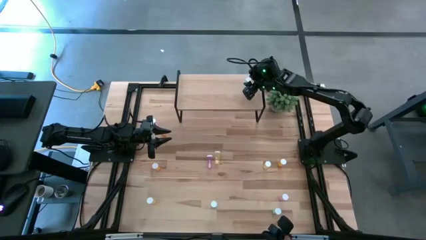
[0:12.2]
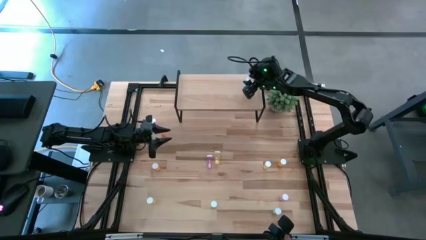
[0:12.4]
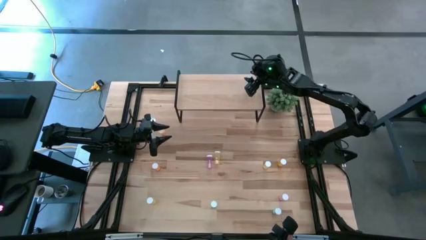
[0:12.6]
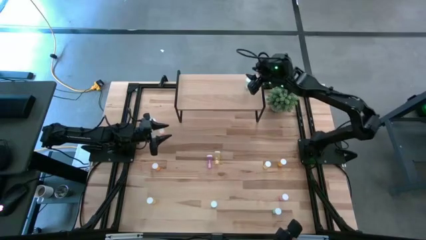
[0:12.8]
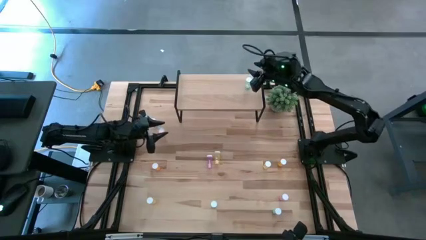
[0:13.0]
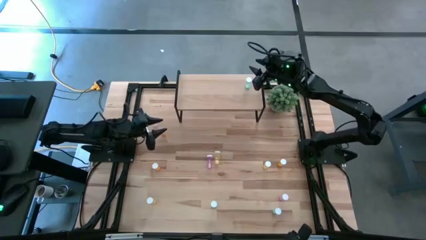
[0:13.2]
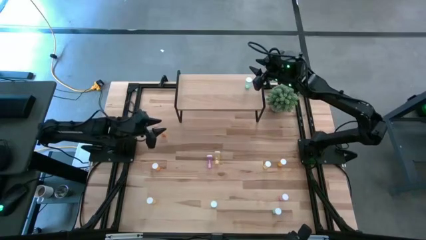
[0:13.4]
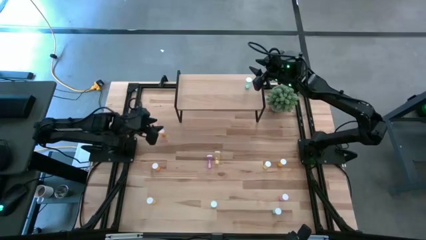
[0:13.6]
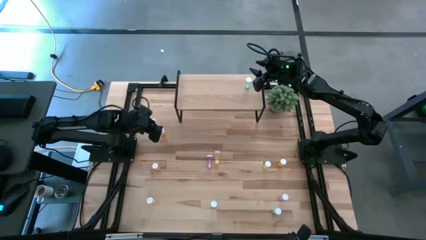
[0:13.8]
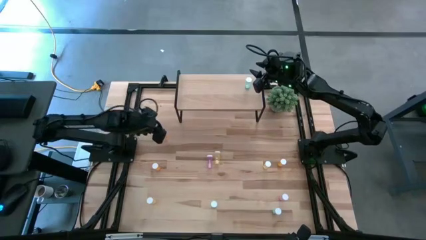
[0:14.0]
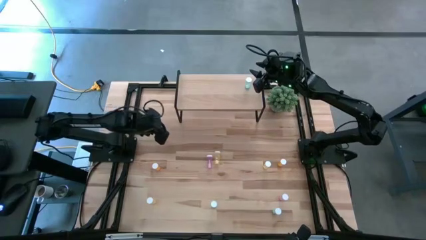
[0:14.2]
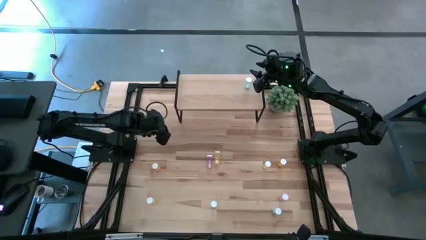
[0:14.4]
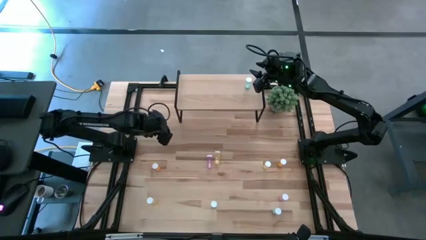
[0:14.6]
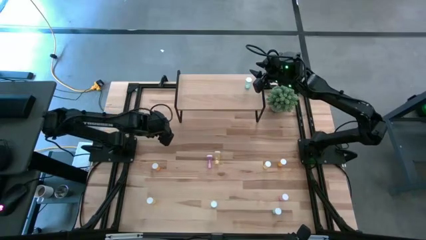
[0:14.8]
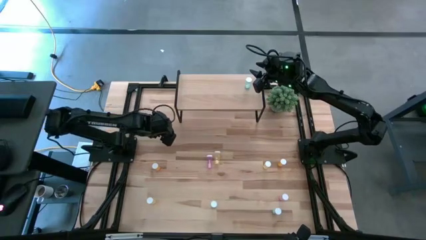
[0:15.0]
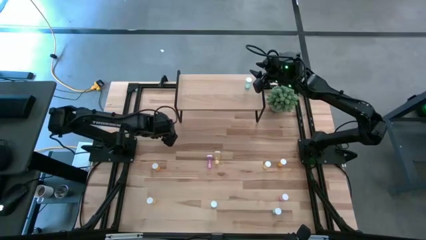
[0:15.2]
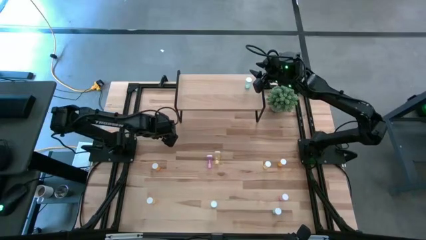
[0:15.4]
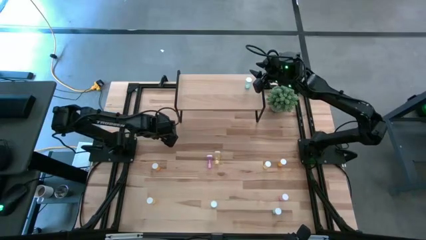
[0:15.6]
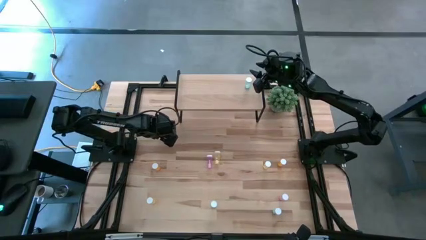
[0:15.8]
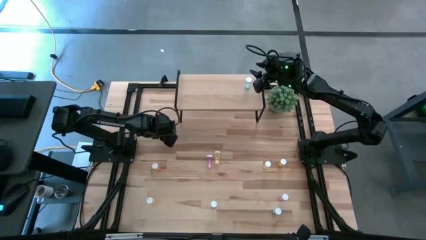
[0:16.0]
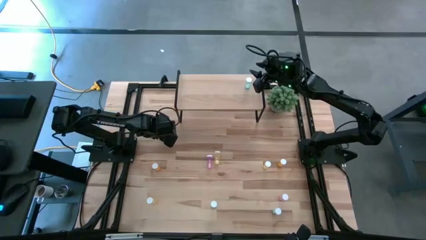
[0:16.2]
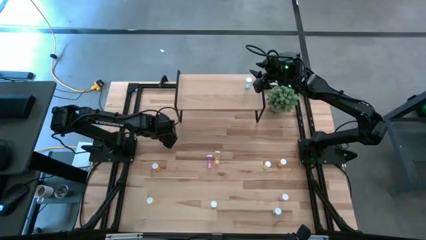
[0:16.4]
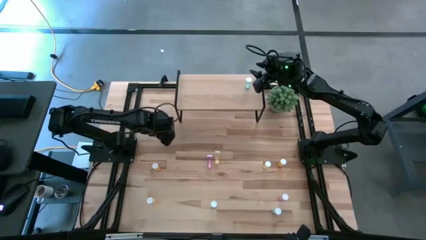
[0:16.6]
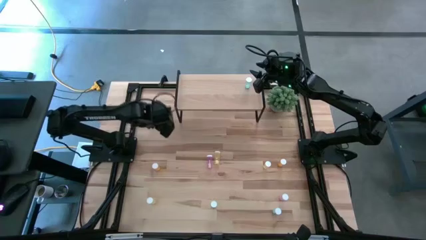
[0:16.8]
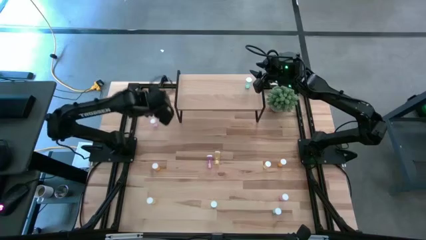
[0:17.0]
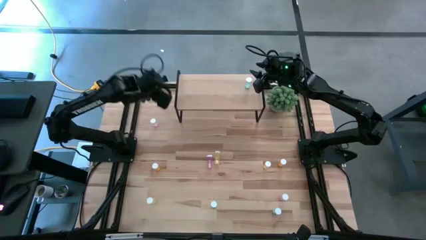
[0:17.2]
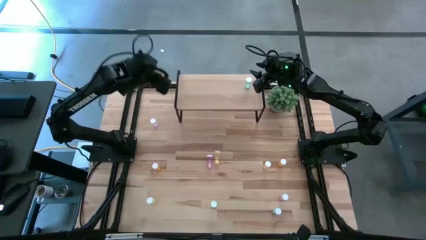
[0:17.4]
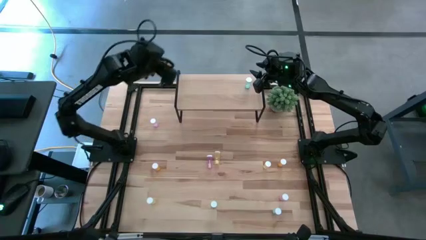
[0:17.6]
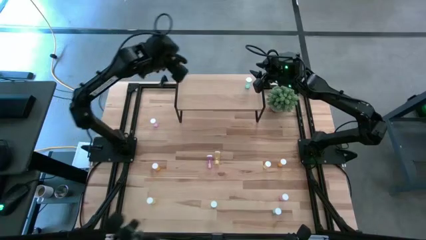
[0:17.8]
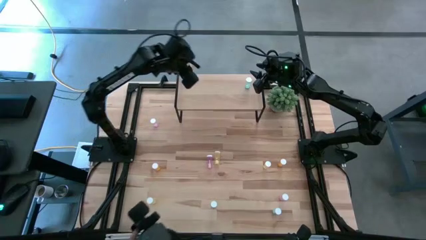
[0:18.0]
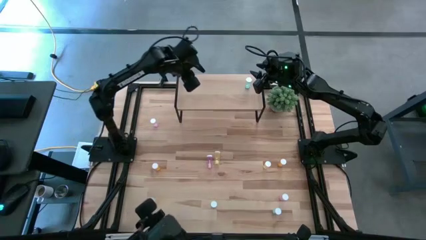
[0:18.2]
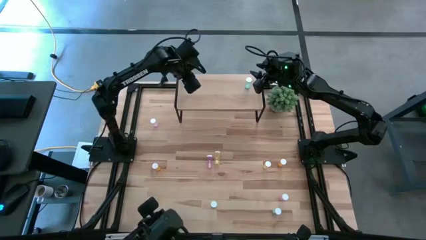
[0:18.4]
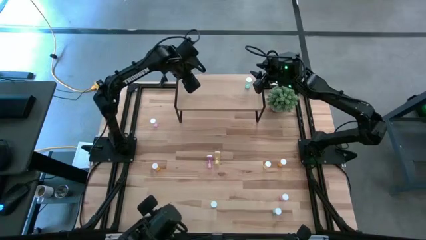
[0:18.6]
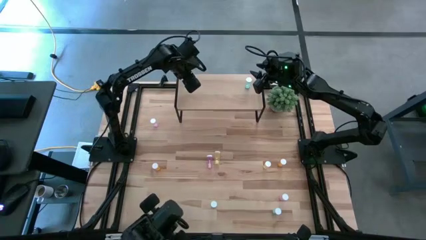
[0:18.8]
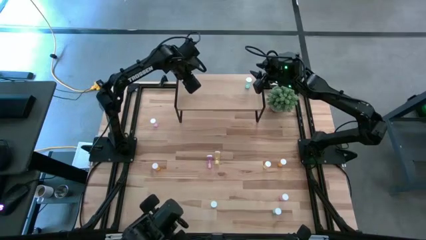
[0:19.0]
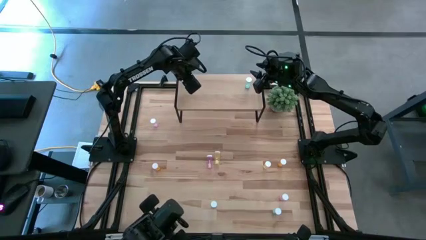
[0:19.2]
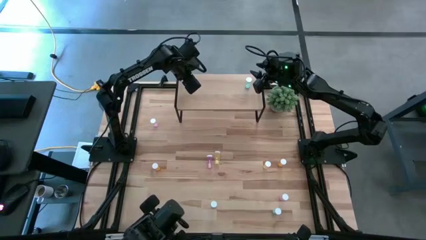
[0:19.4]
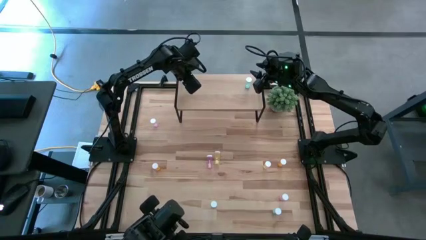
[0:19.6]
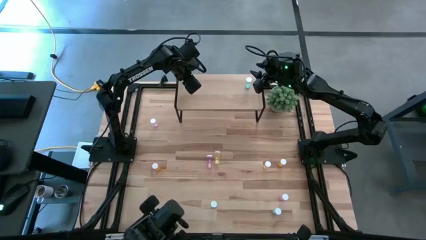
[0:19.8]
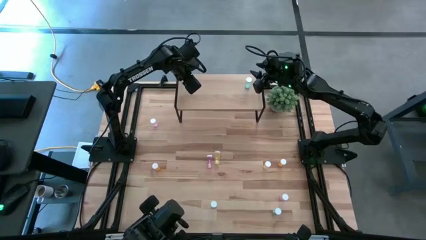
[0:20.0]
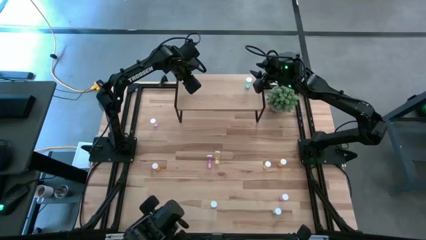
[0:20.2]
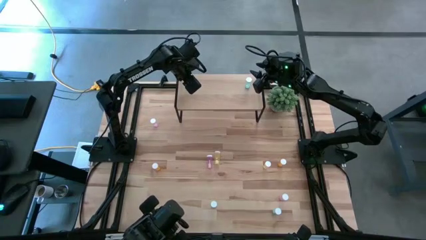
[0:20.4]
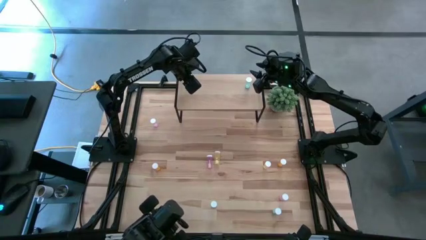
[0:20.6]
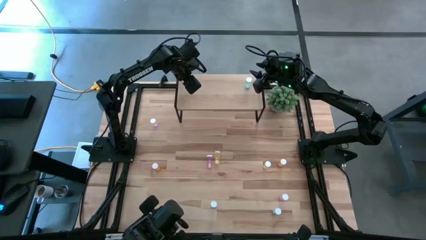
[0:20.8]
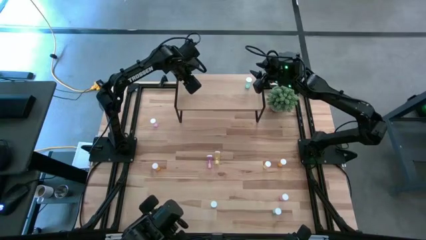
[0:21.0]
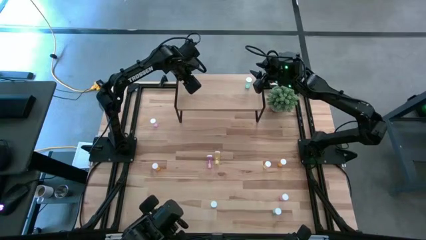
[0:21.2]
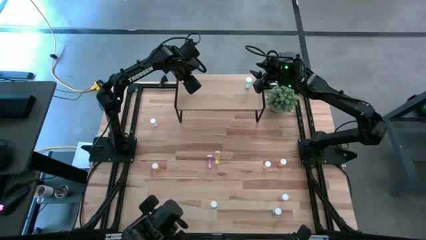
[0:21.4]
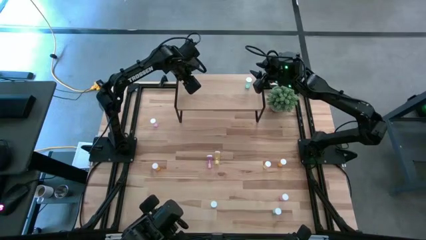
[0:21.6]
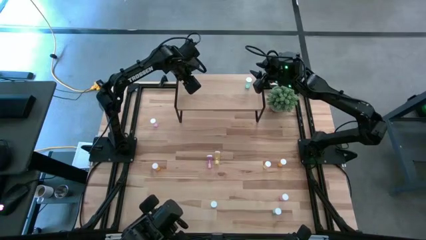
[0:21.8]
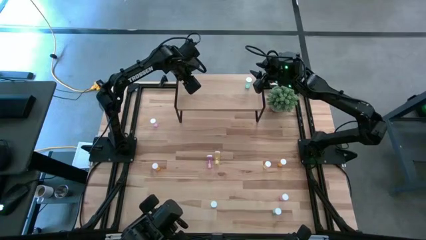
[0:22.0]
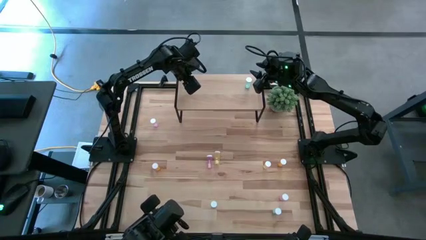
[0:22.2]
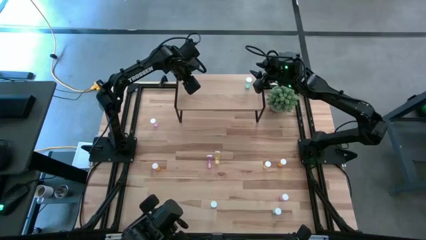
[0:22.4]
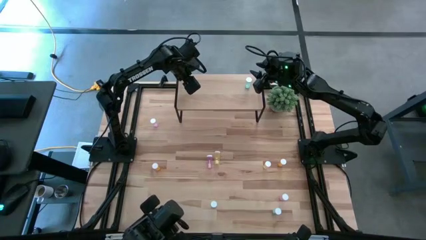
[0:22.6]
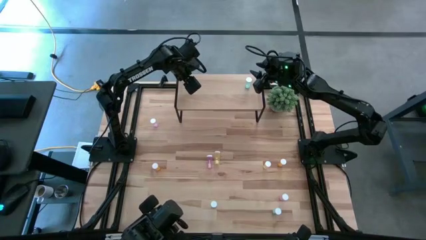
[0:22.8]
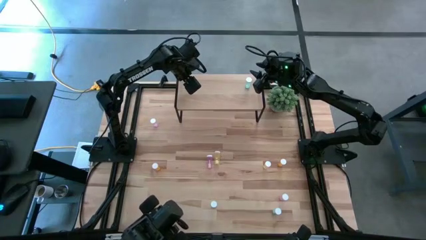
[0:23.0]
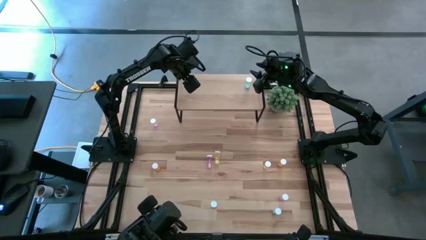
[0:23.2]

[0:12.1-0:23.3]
Task: Pick and place medicine bottles onto shelf by color
Put the top orange pill bottle on the shelf

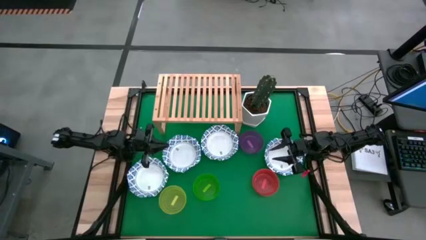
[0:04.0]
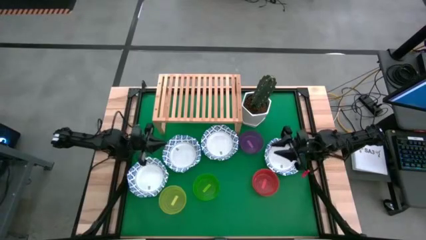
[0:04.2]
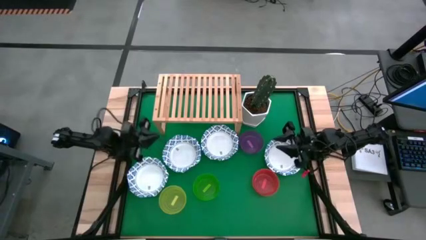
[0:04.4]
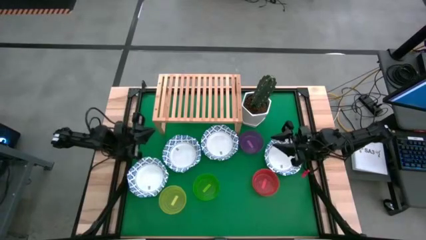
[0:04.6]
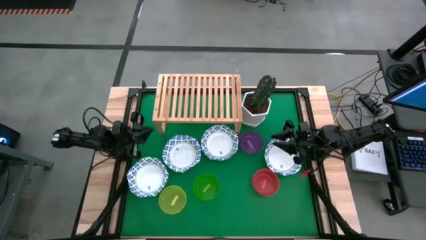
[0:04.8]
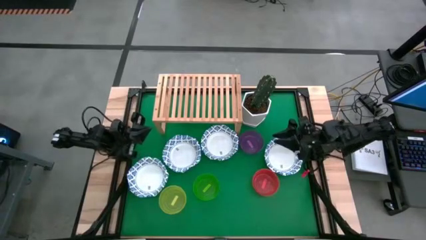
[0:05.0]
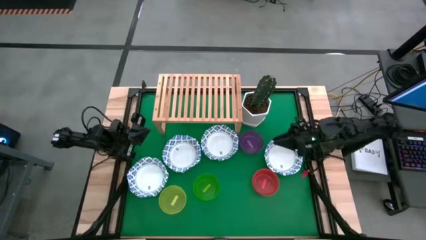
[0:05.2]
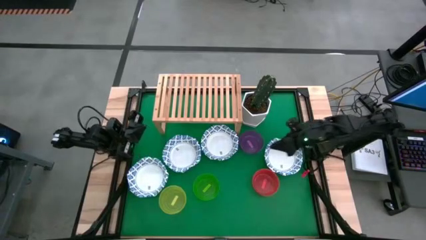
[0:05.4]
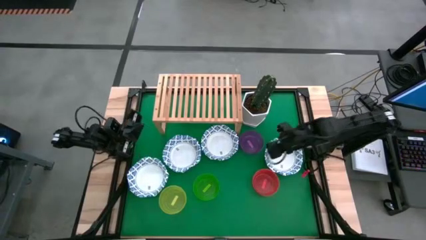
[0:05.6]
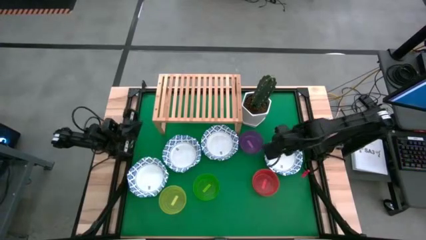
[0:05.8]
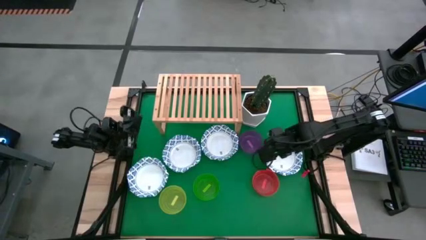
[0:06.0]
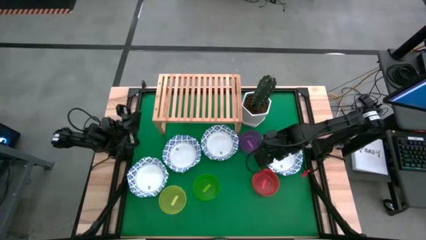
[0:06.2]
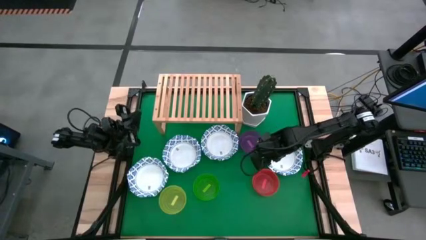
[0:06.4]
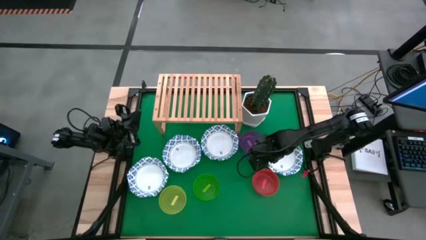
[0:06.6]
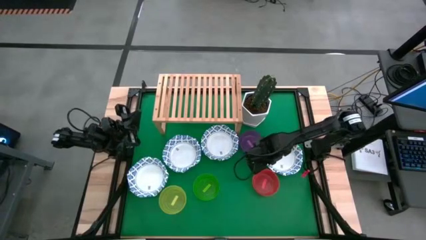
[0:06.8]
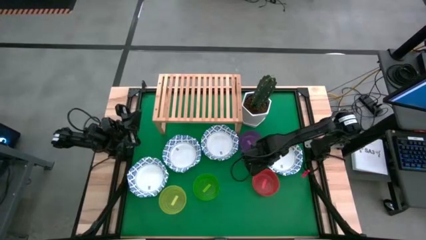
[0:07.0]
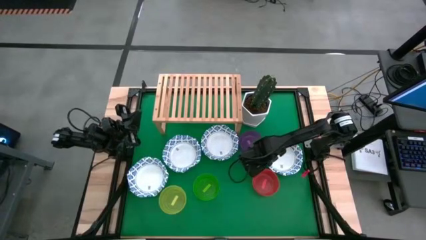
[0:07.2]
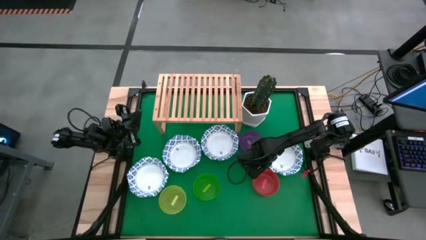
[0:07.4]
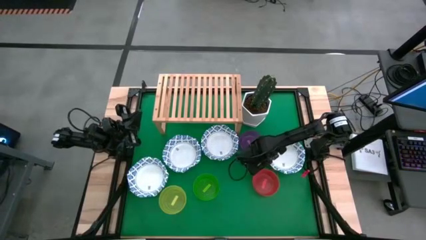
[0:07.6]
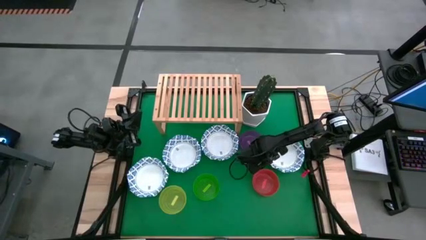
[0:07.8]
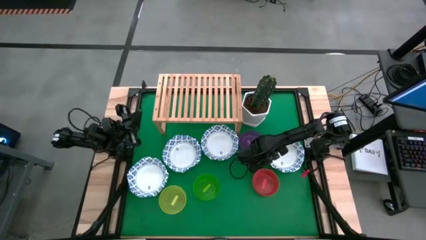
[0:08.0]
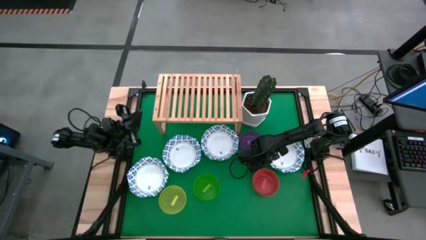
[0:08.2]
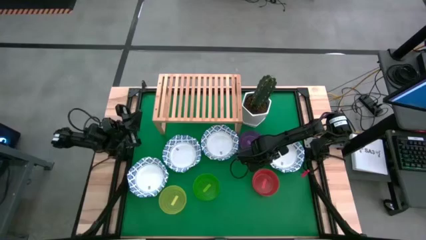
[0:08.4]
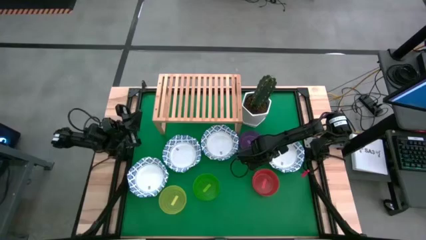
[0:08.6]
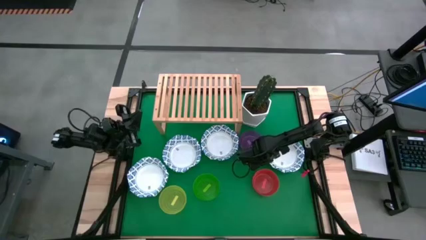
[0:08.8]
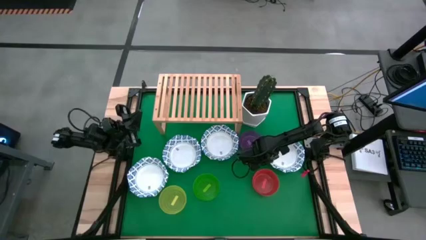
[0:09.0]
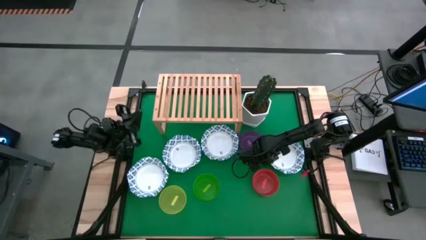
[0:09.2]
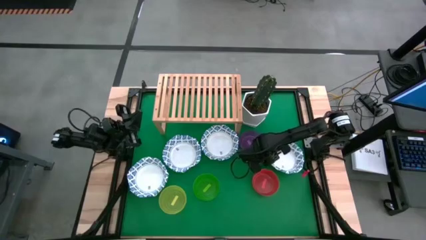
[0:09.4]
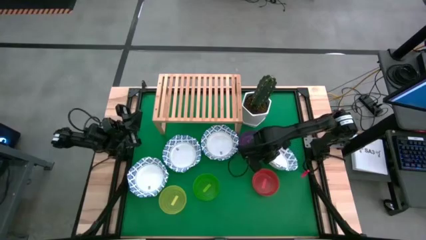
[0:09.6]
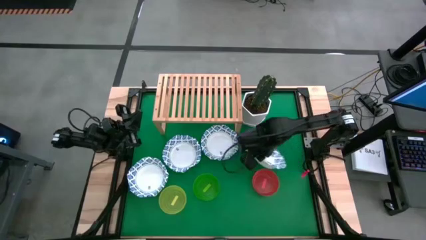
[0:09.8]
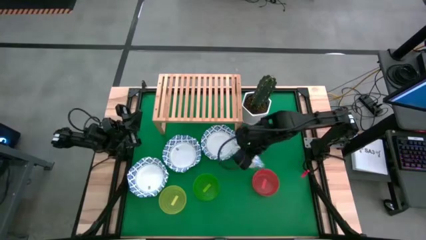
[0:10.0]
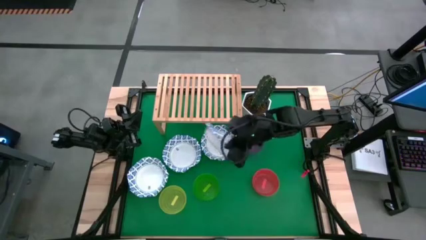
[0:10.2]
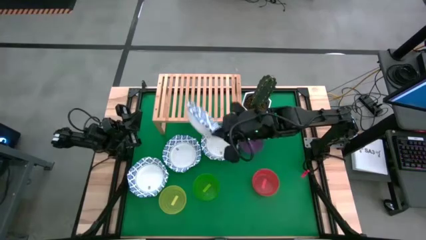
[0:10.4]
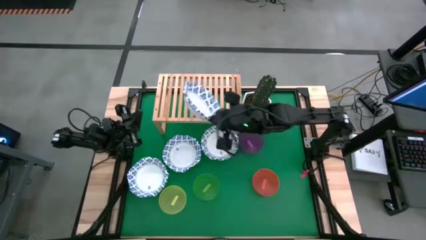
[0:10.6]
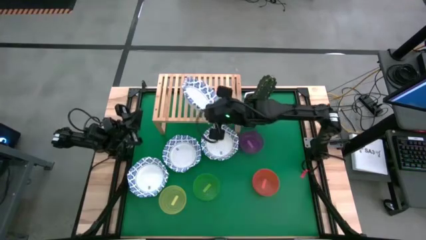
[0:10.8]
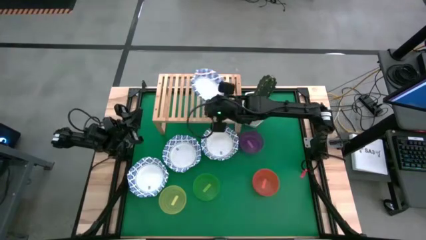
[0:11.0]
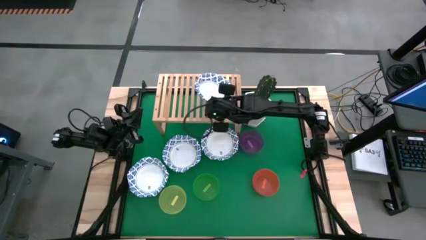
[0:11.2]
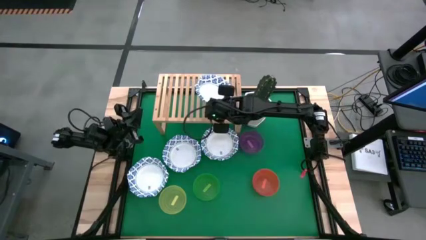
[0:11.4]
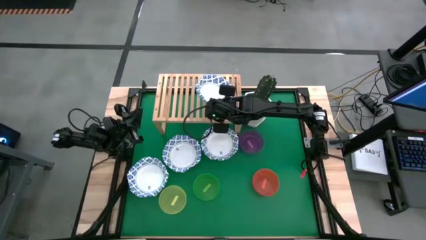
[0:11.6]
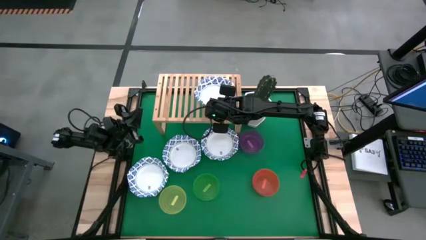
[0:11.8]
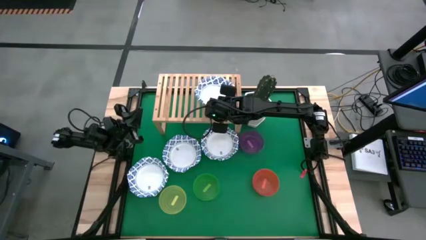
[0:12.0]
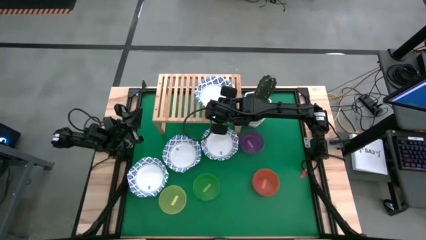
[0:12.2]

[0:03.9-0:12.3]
Task: Place and stack bowls onto a shelf
Put the right white patterned bowl on the shelf
